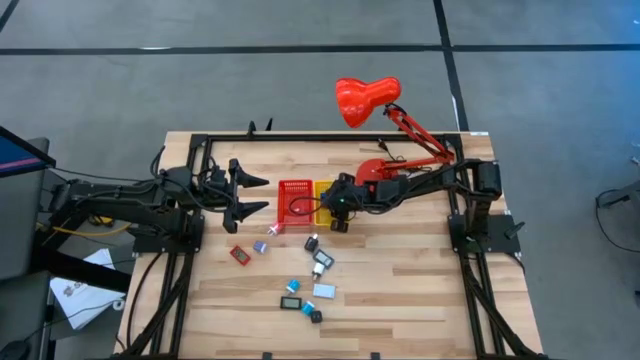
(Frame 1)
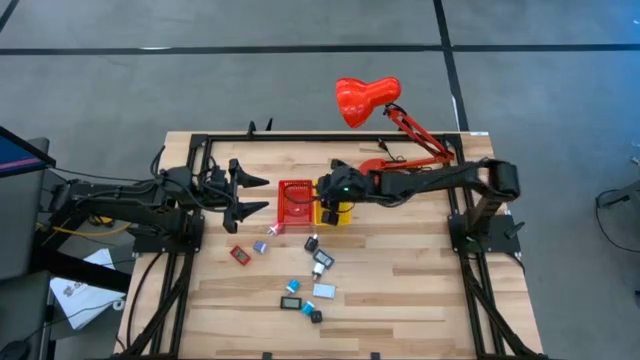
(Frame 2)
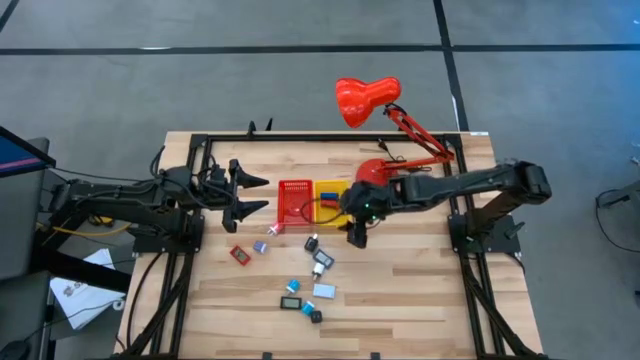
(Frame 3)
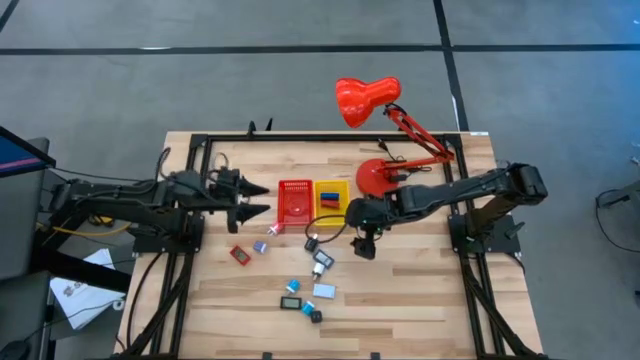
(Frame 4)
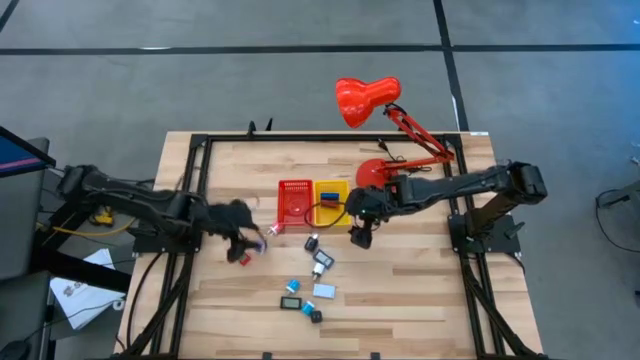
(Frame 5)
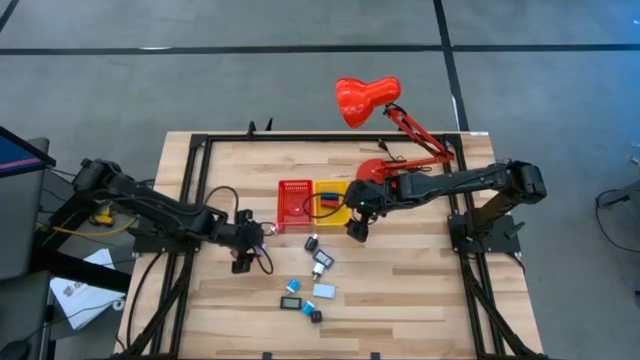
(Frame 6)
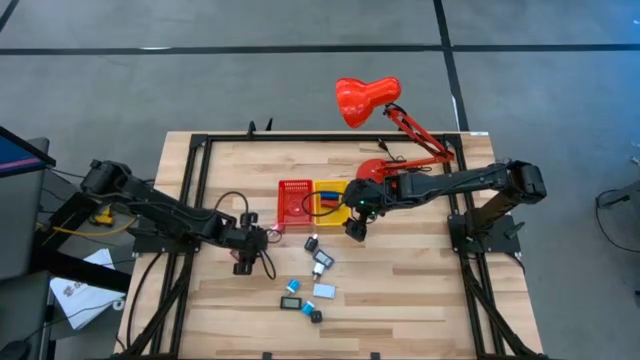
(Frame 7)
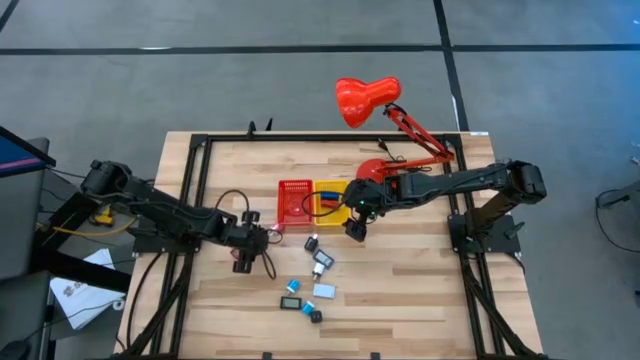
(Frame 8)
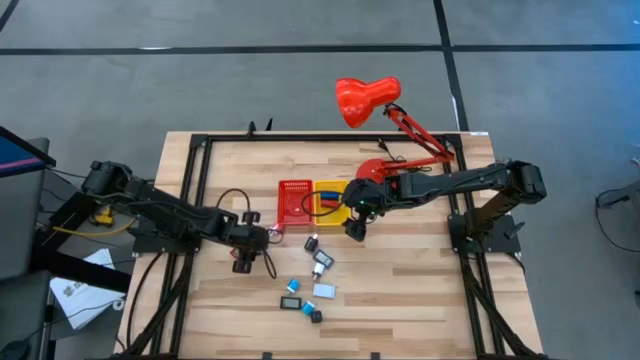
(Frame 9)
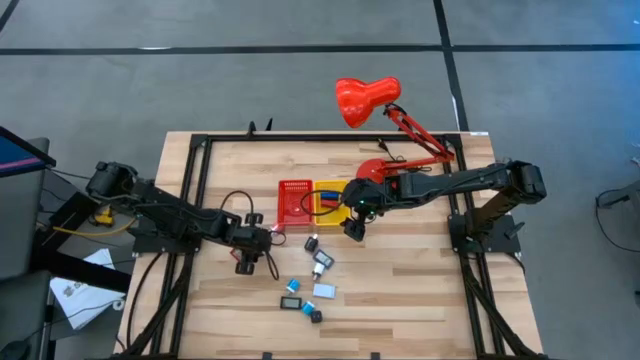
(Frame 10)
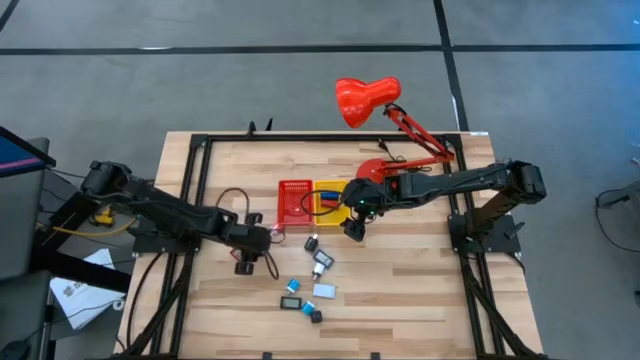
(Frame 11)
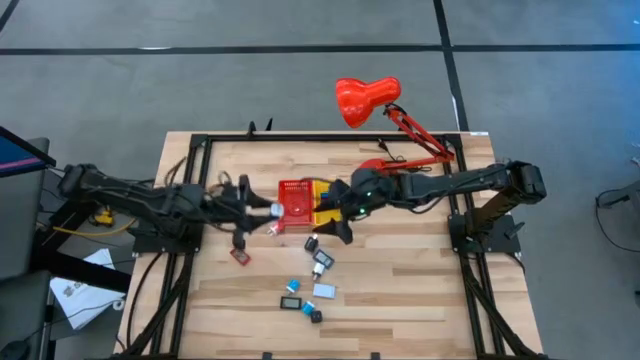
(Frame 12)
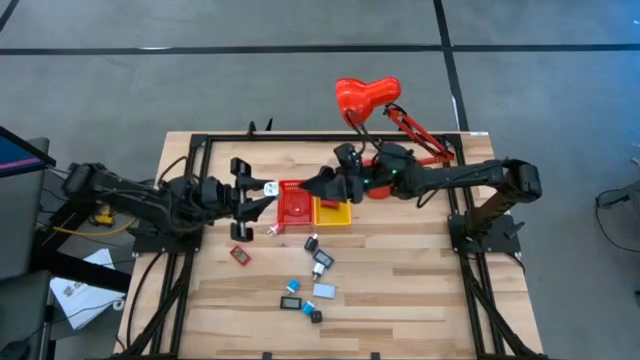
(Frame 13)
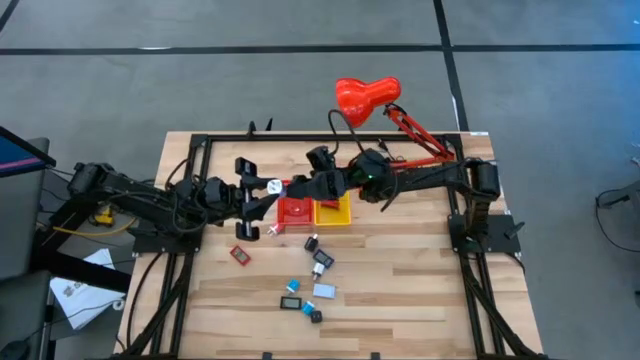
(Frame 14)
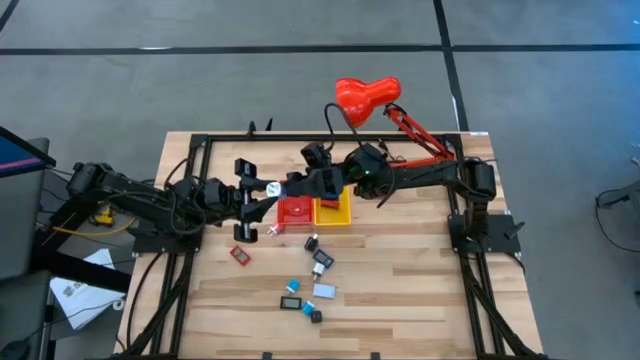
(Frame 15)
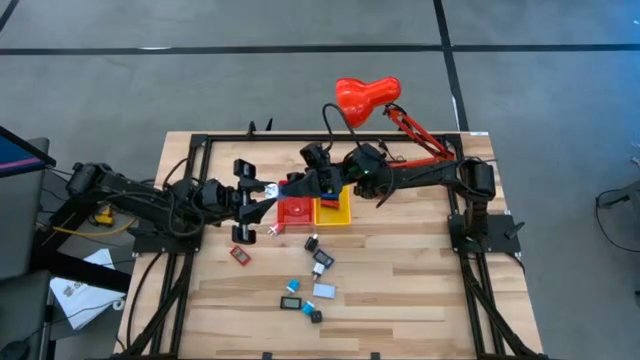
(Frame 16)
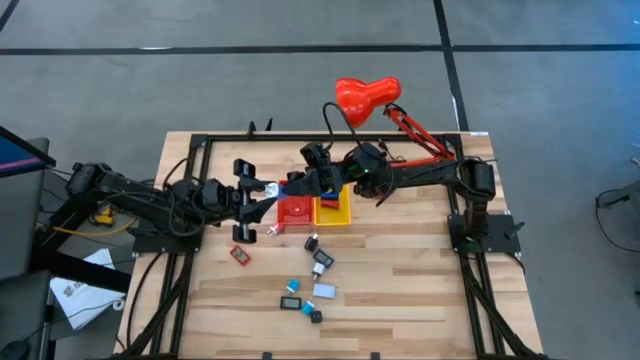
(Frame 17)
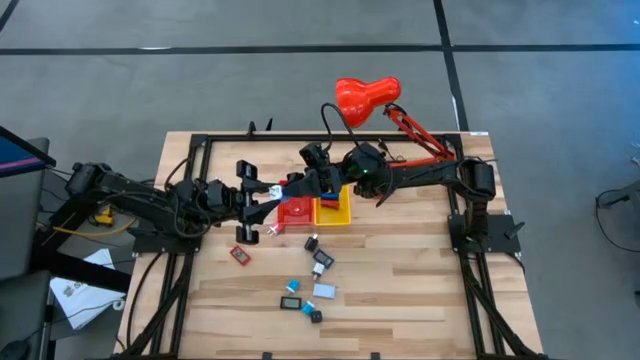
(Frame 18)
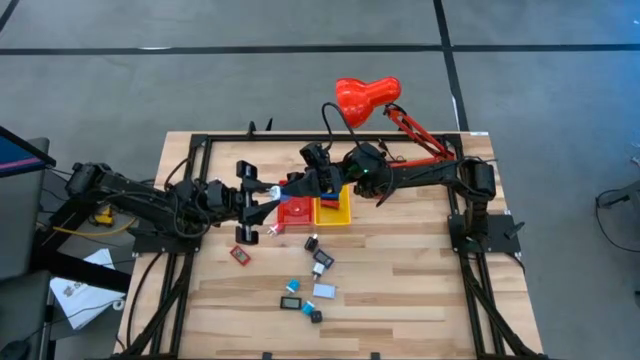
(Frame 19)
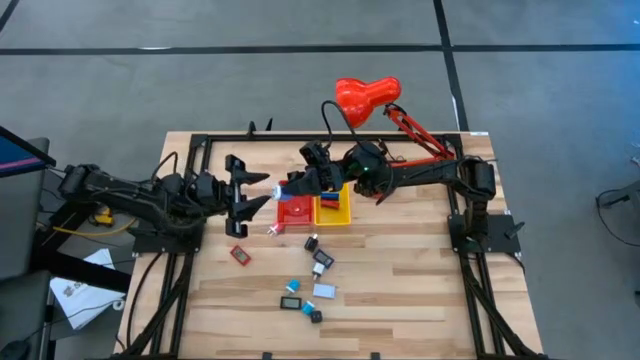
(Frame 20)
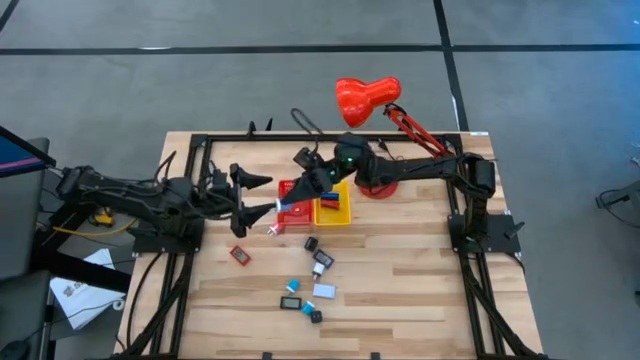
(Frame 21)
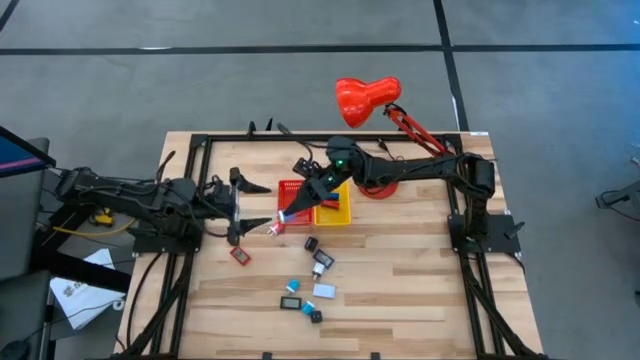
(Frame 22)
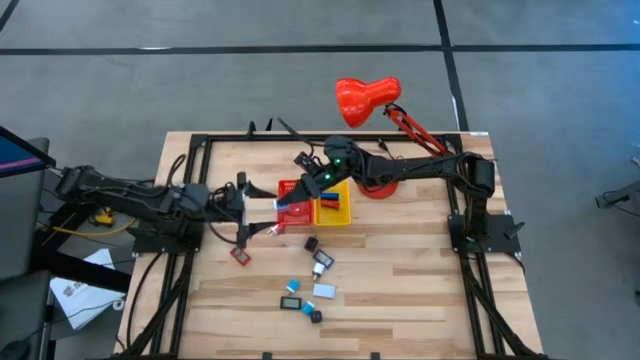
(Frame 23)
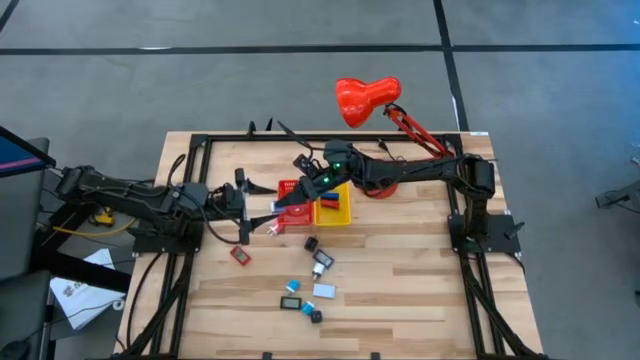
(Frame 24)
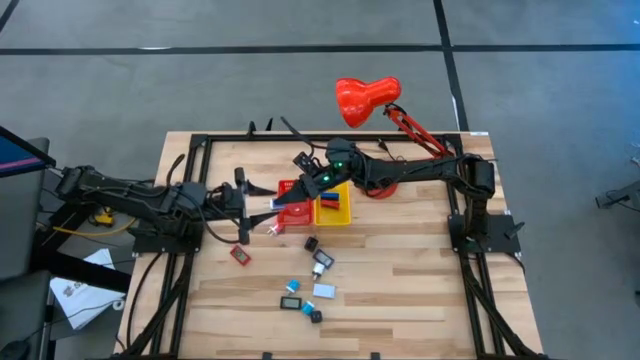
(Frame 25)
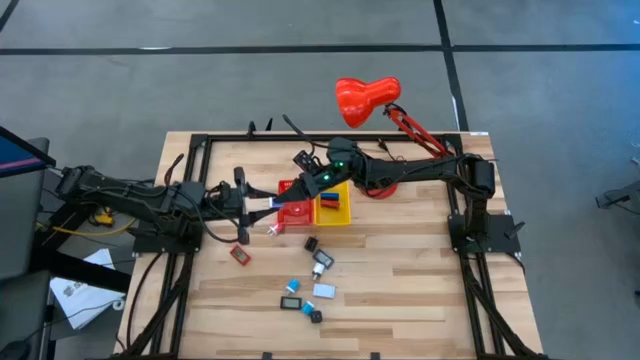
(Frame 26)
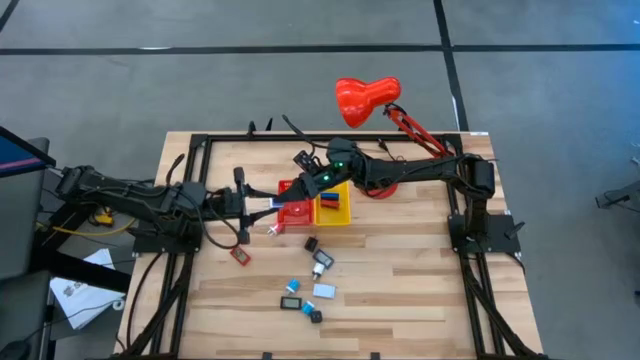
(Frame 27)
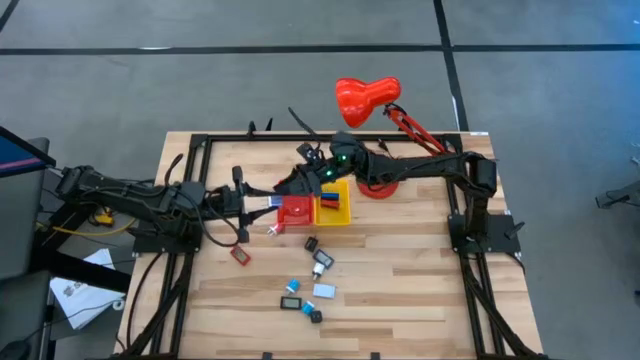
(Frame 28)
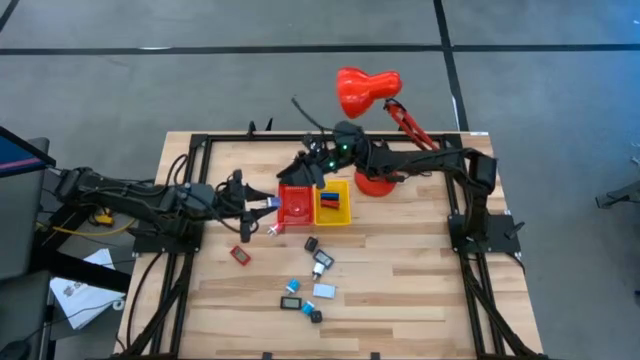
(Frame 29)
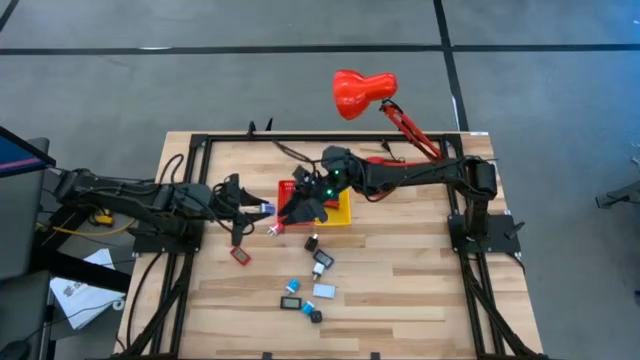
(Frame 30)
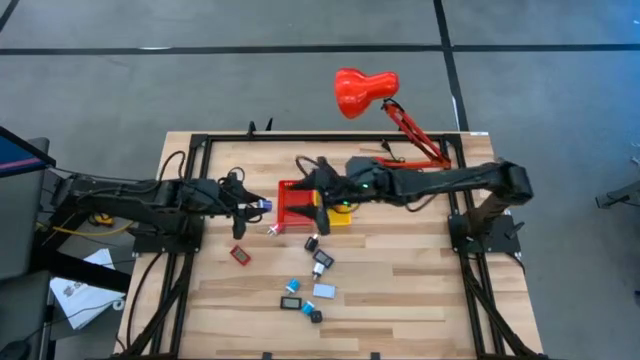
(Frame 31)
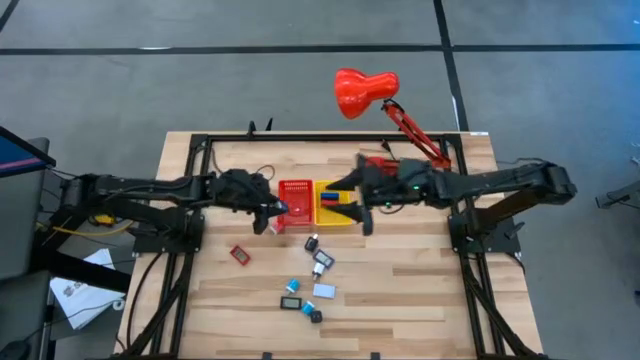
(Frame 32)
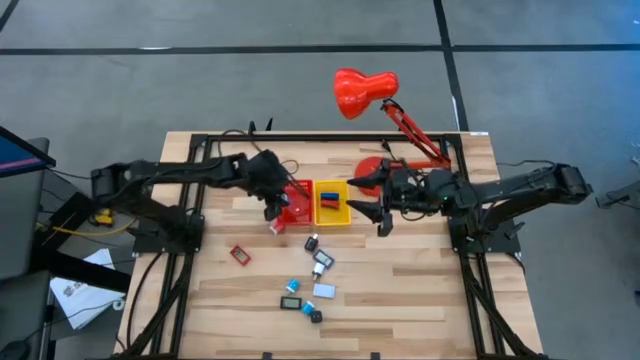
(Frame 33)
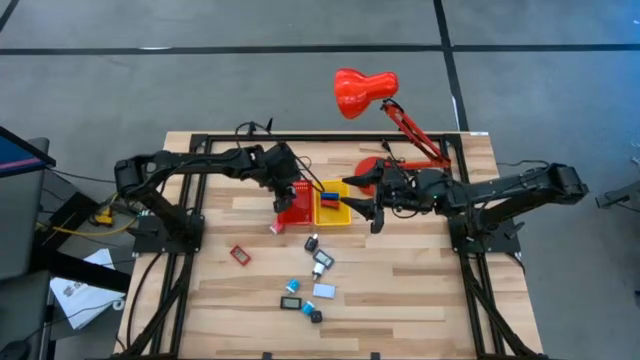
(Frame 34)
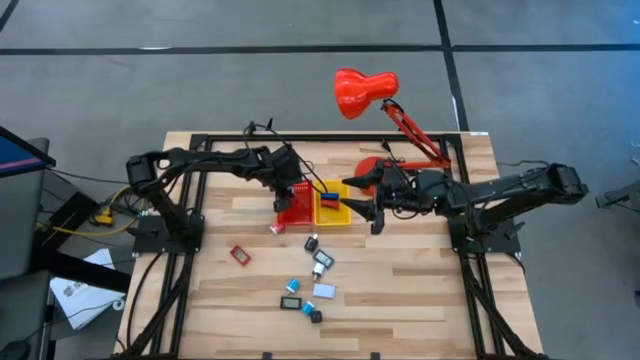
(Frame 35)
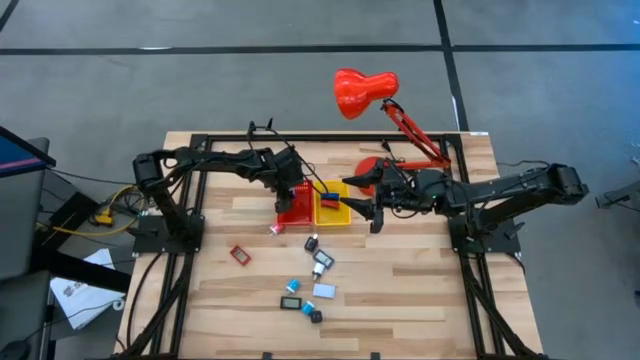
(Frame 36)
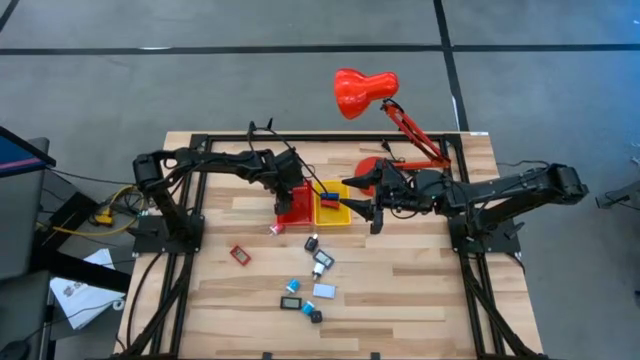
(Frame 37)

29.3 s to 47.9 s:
Task: Pick & Place Office items
Put the purple charger adapter into the red basket

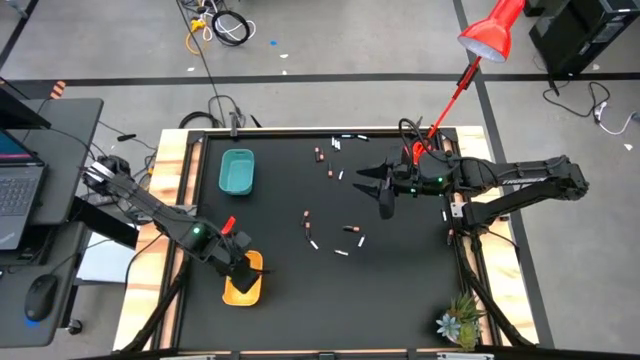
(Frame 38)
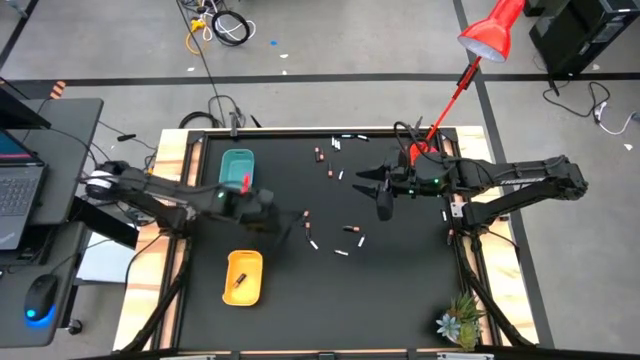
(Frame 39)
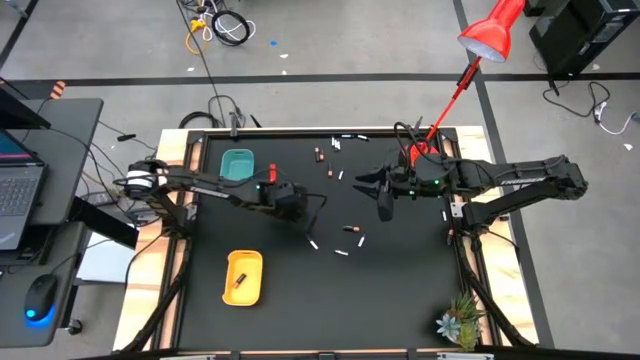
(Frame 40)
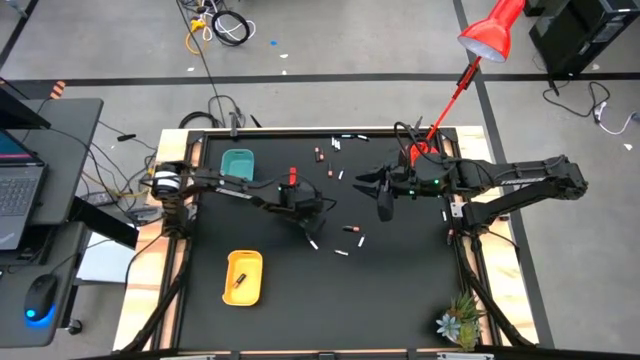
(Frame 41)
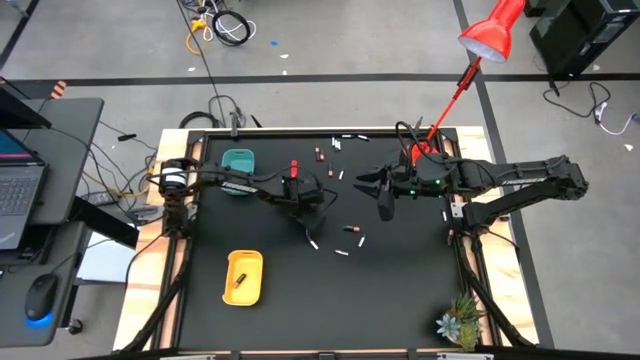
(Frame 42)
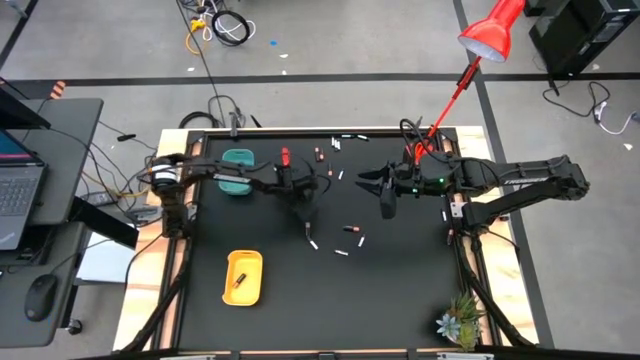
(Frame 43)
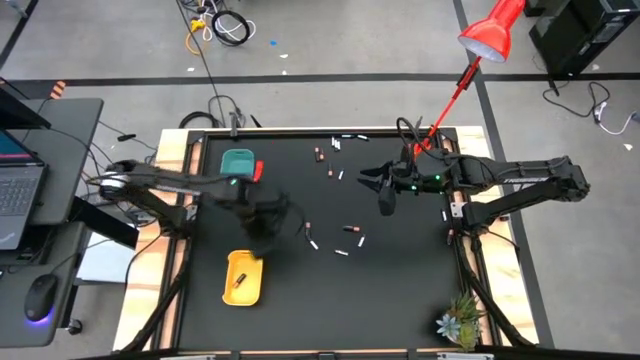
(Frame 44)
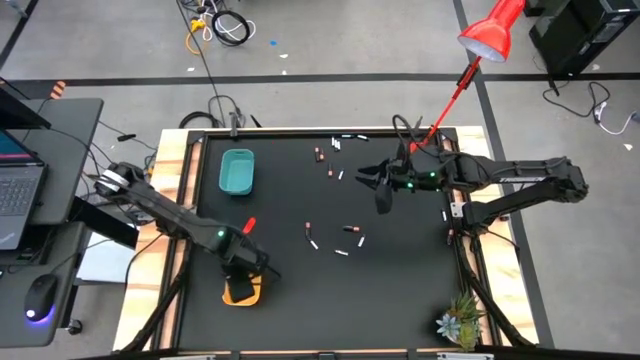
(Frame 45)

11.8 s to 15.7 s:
Task: Sort batteries
Put the black battery into the yellow bin
